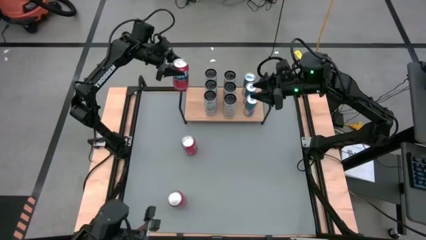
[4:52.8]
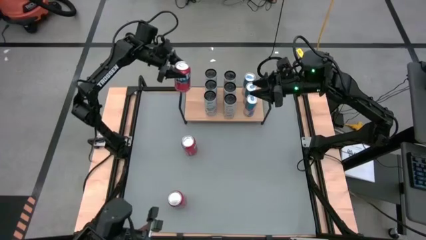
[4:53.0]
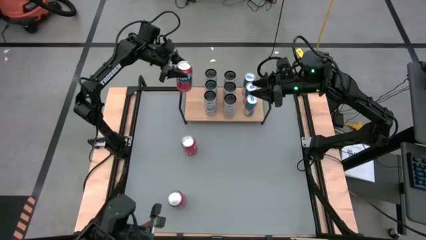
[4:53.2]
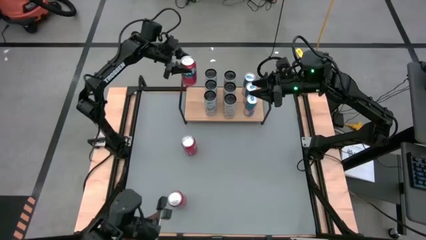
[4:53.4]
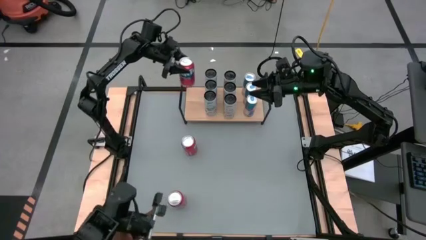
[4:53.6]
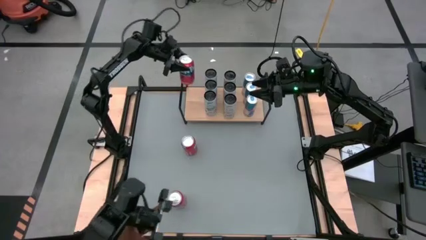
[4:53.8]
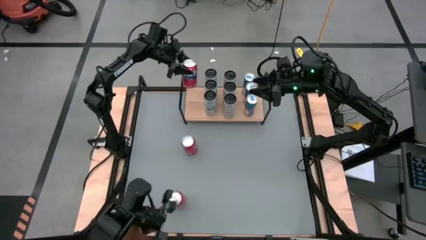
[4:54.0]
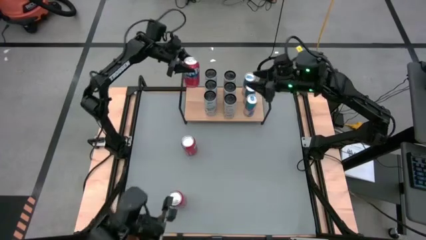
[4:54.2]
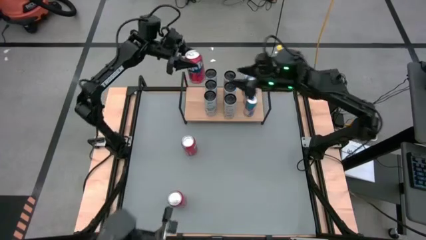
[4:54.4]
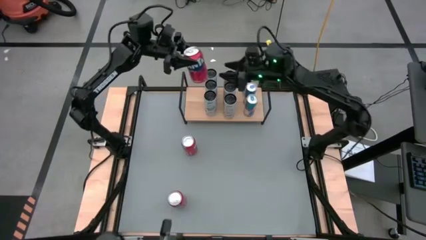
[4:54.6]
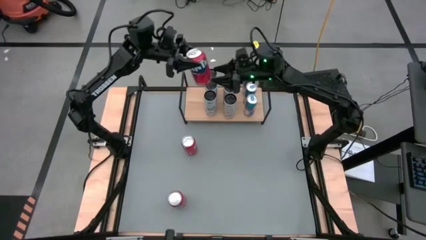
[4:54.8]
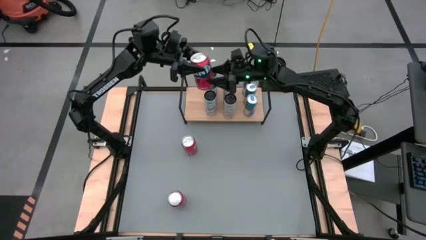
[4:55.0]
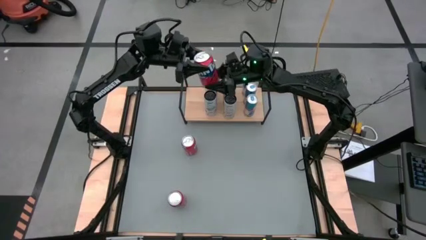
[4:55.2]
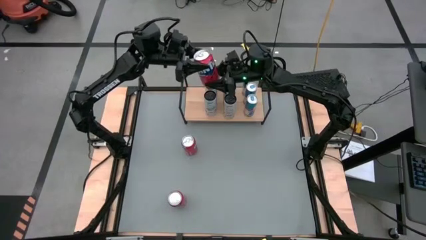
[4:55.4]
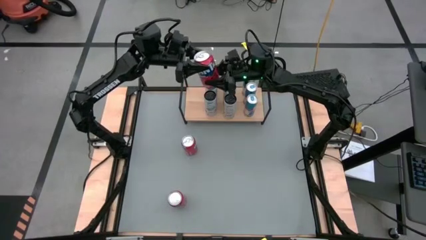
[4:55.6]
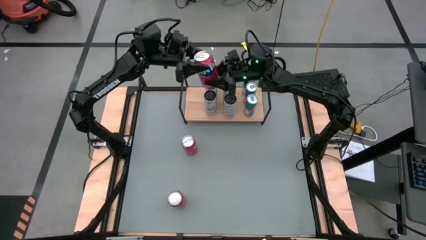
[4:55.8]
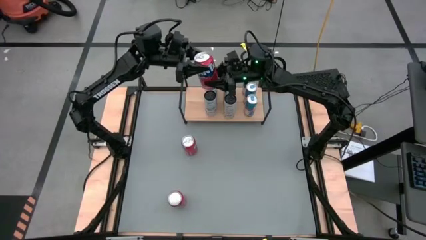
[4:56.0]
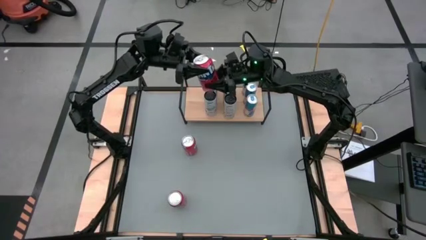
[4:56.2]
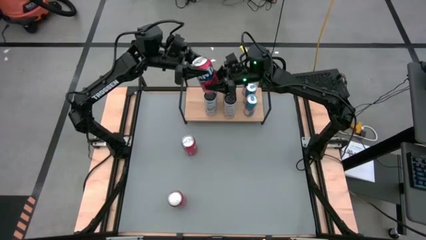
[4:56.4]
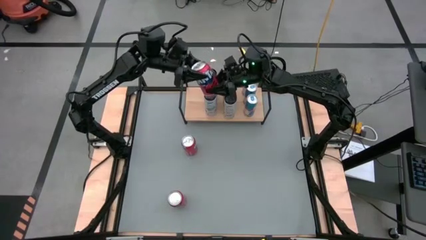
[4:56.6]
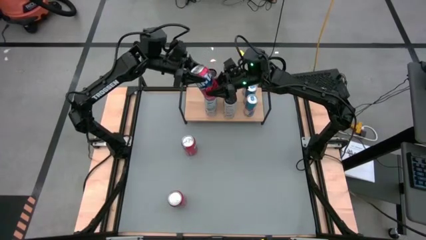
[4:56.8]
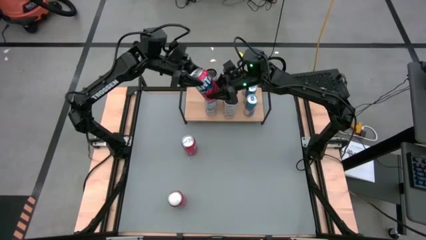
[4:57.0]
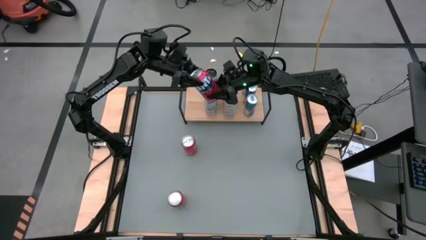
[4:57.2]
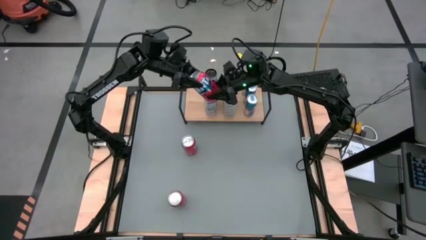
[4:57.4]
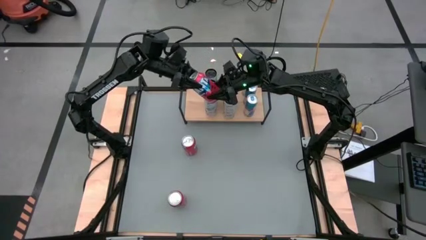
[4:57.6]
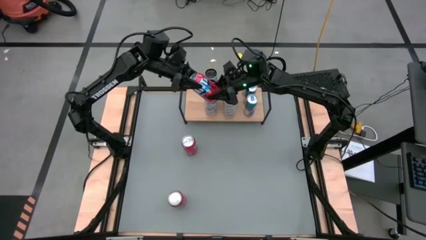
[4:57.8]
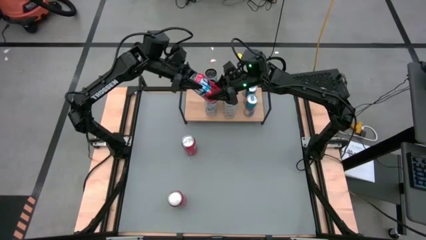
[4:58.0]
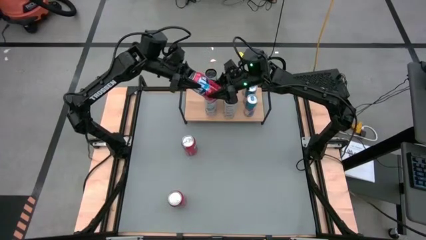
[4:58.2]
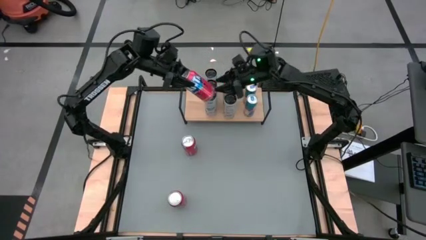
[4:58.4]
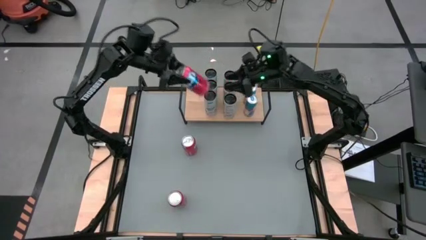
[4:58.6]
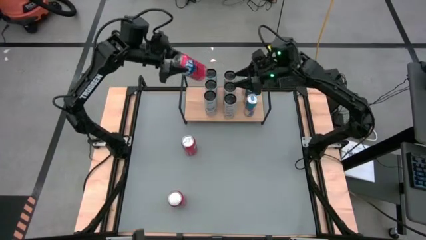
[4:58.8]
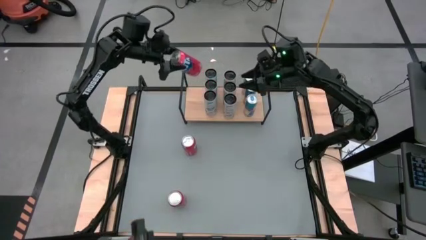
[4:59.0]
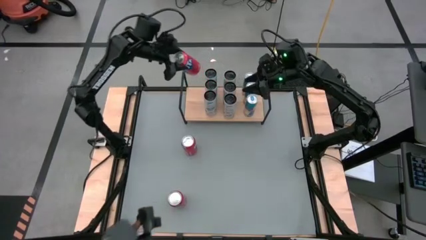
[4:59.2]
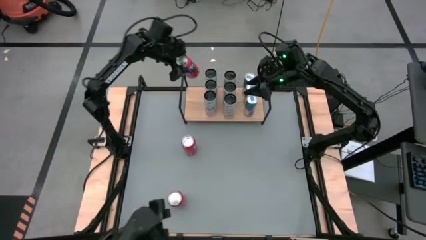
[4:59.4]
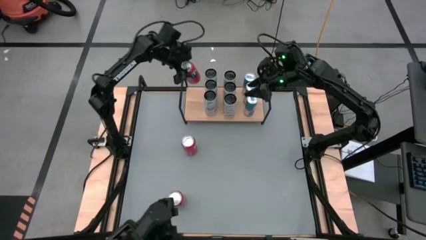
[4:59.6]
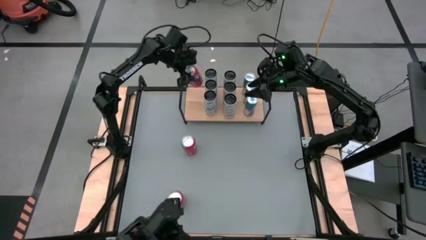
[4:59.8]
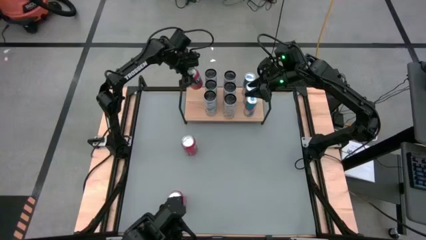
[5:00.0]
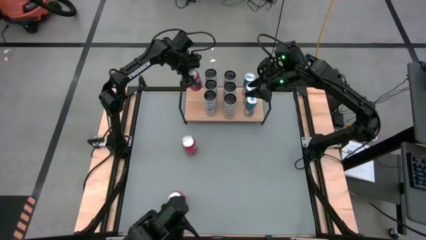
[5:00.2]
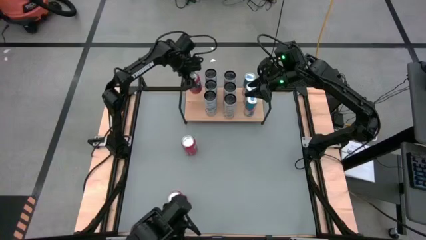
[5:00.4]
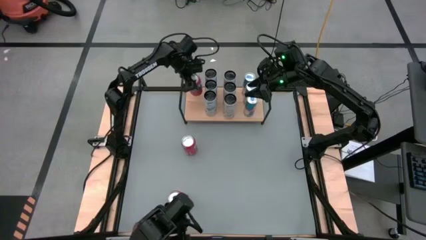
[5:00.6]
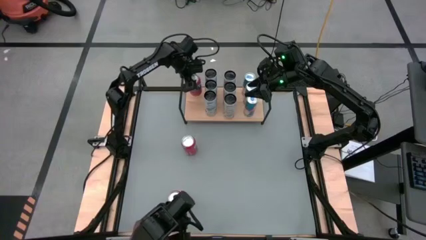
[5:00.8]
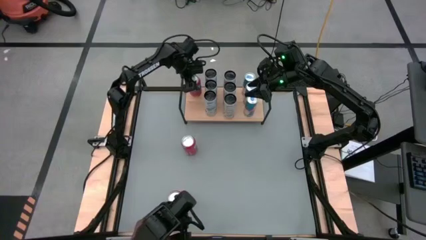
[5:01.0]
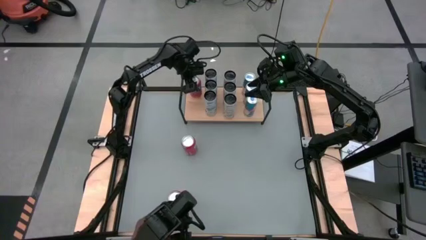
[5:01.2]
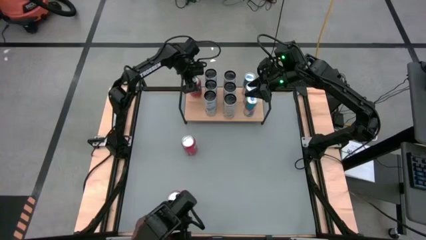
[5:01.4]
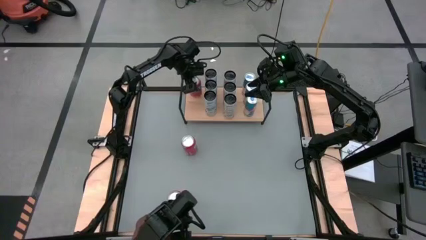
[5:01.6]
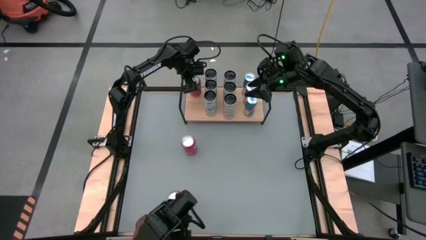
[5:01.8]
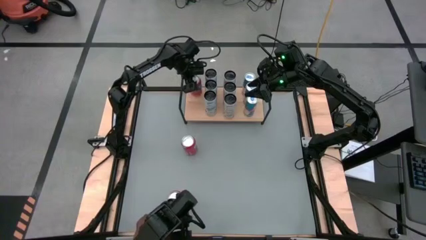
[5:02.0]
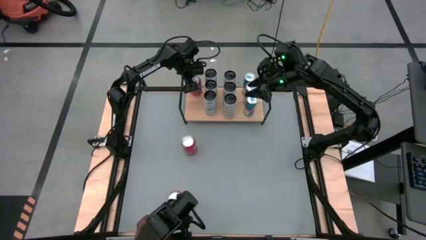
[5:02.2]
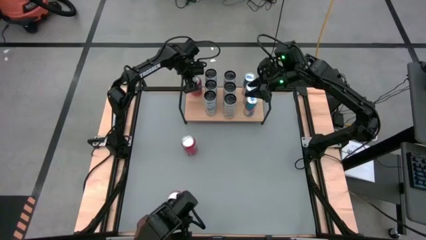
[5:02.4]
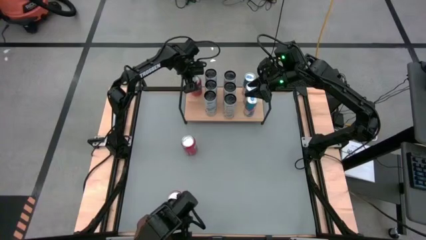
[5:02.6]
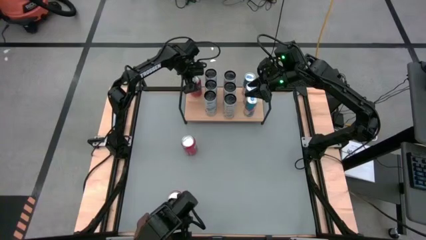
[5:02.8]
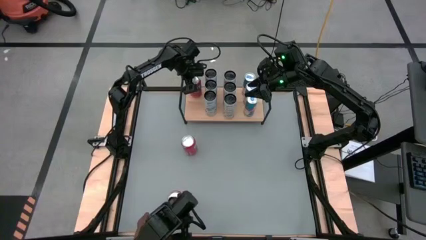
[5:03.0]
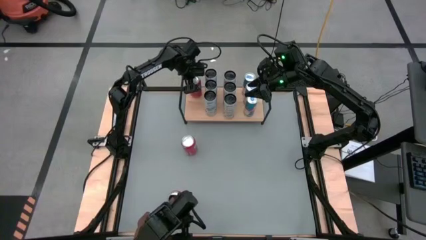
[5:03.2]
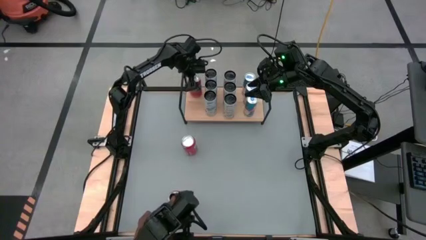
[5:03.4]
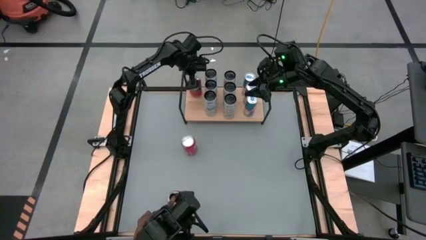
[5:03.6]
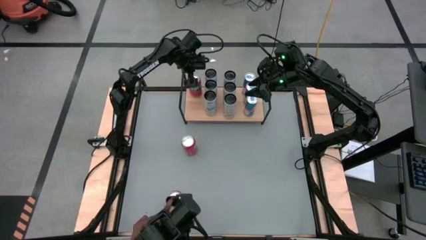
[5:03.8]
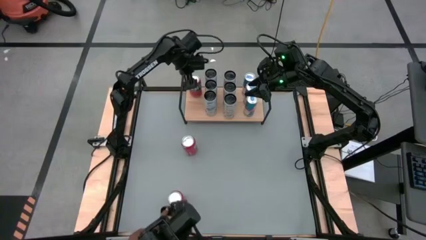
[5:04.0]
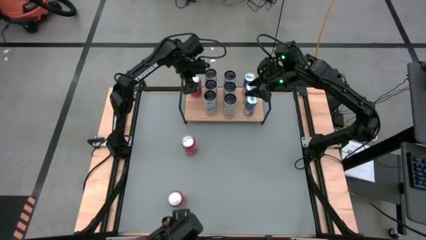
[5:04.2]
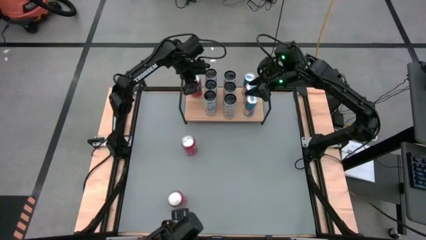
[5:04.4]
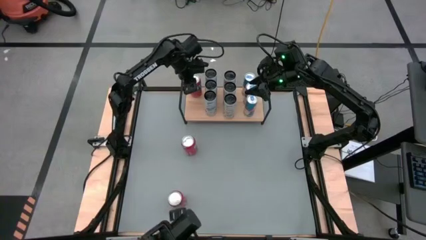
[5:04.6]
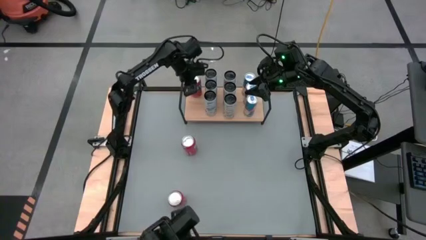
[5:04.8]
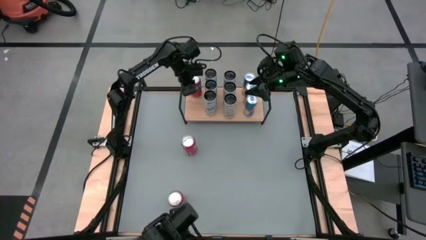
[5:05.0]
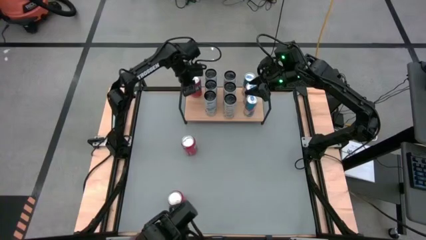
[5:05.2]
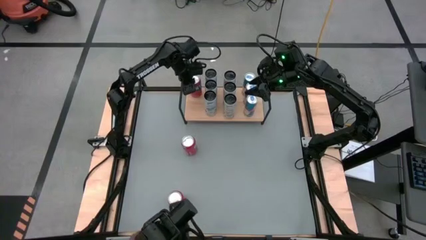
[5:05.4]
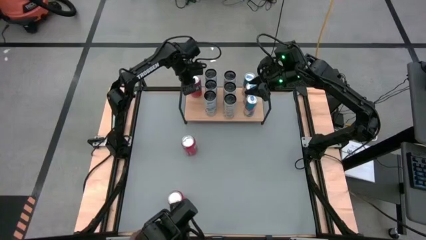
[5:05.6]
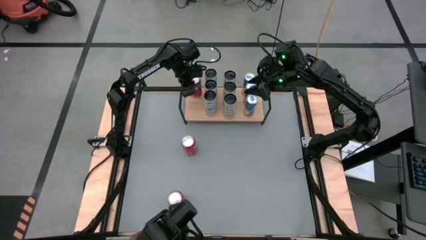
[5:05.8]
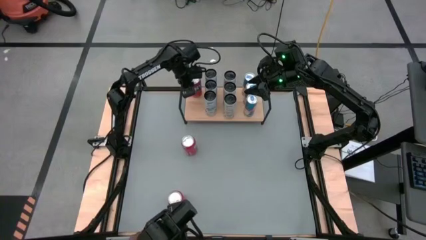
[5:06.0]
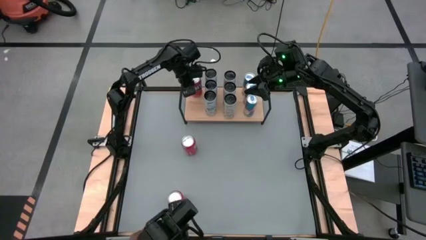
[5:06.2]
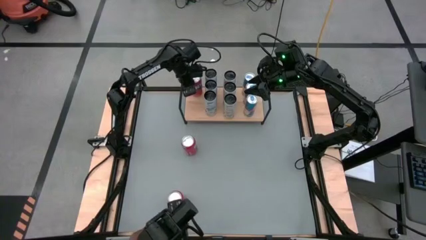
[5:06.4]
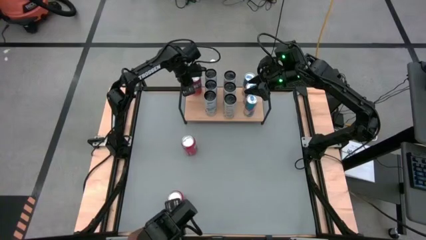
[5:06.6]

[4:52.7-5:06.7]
Task: Place canned beverage on shelf
Put the middle right red soda can on the shelf
